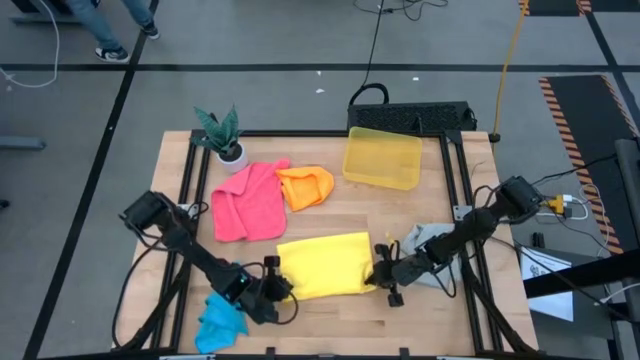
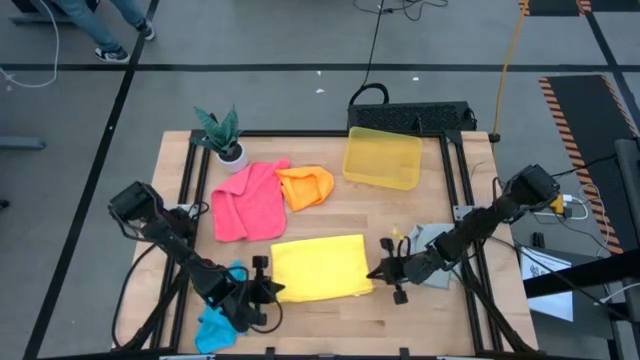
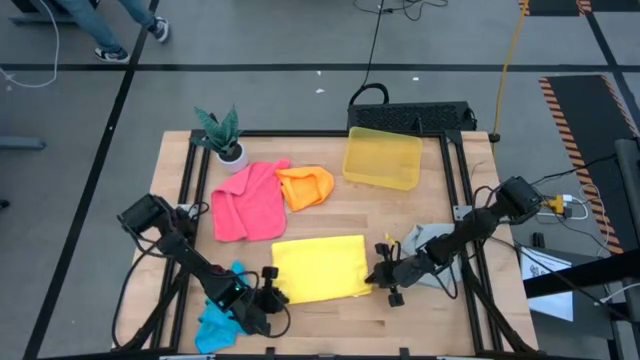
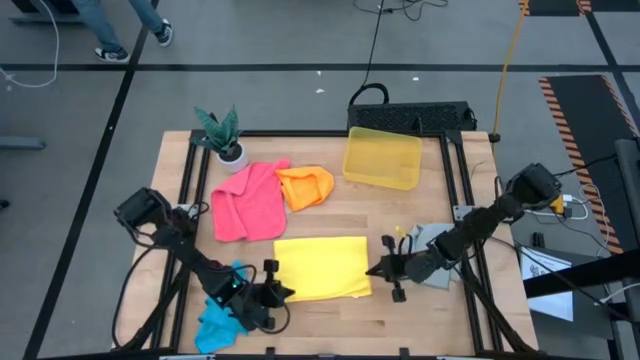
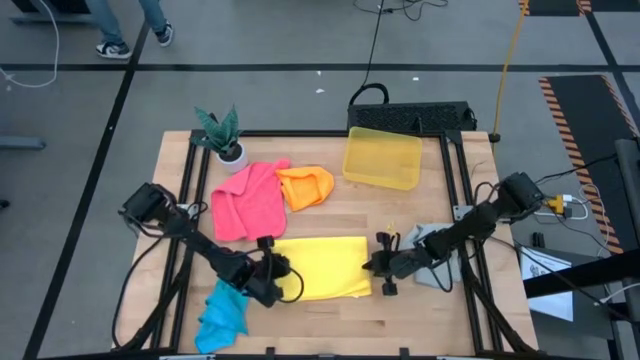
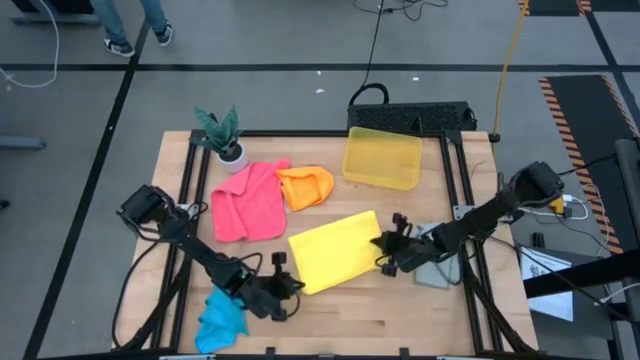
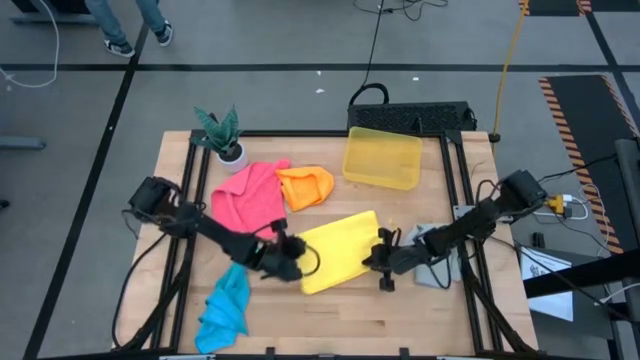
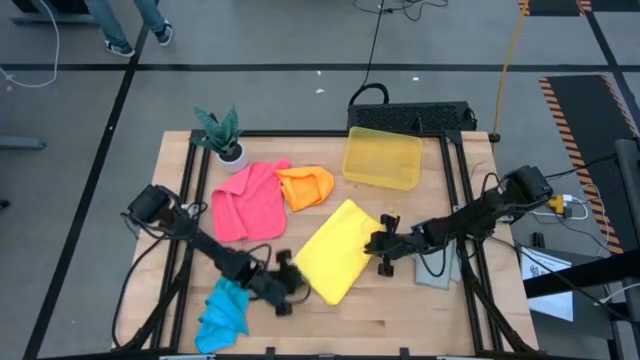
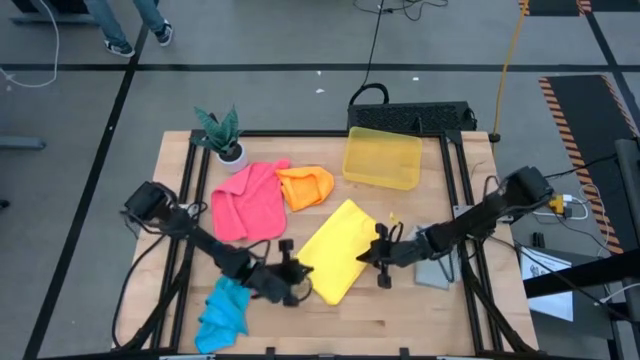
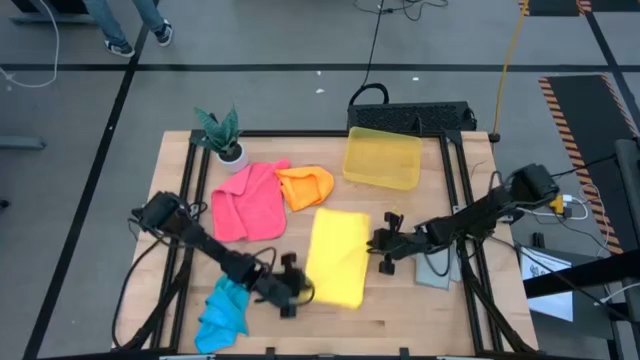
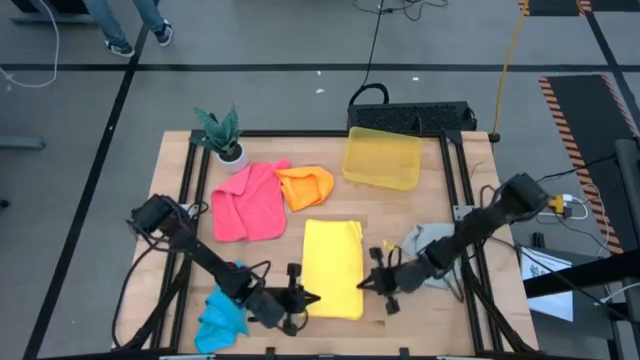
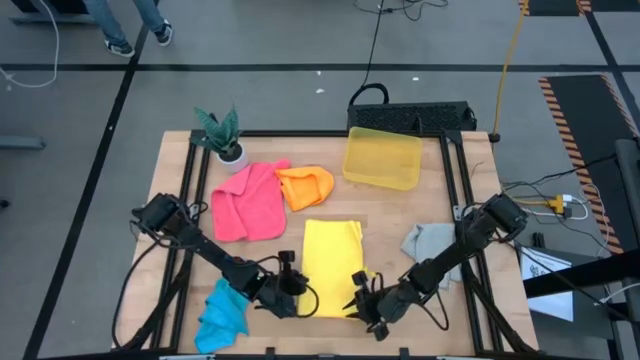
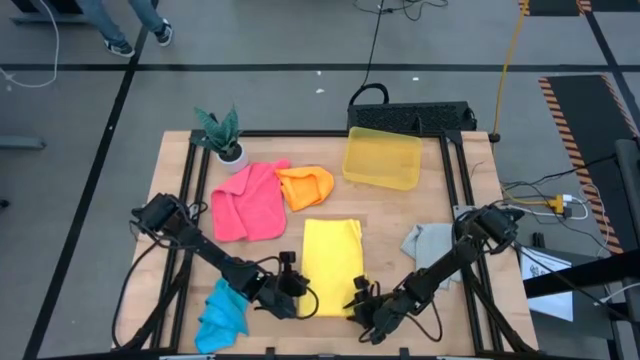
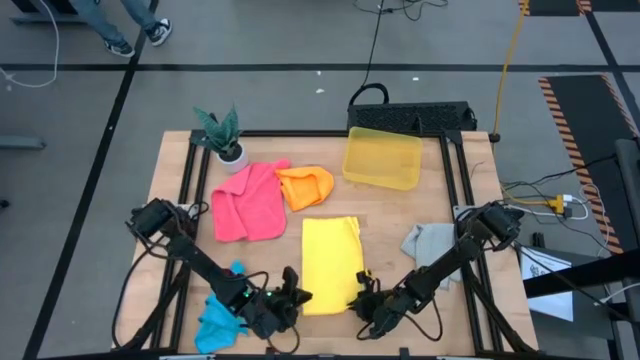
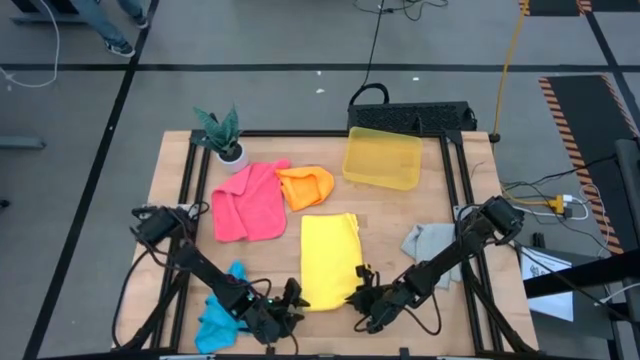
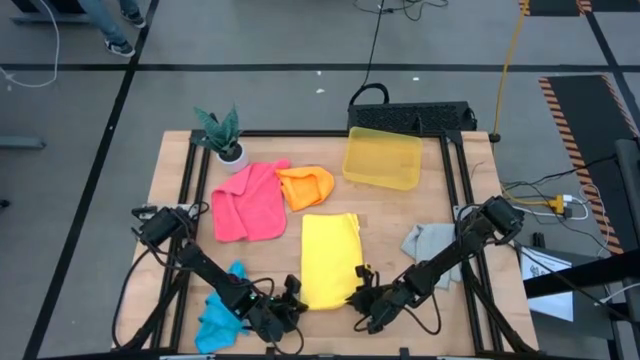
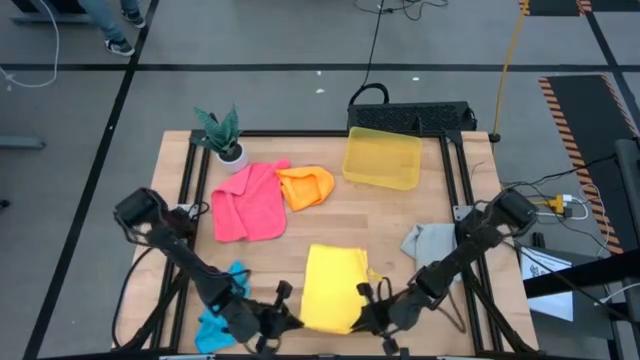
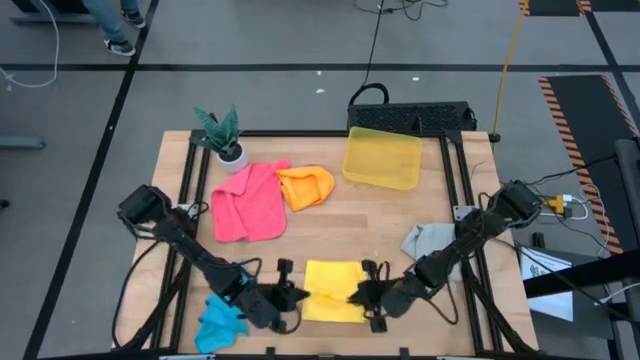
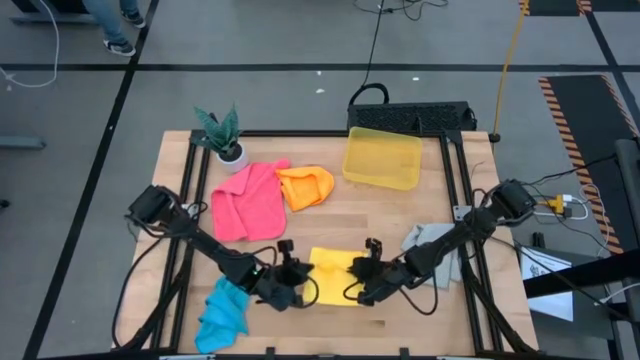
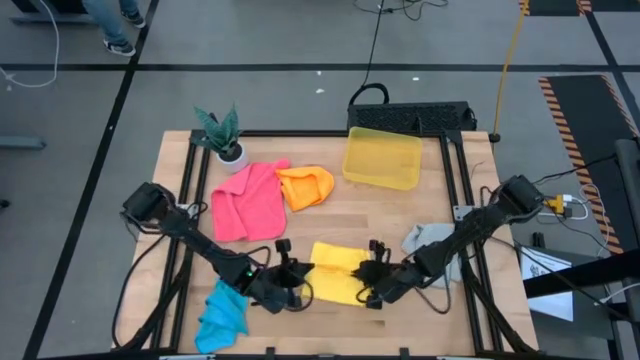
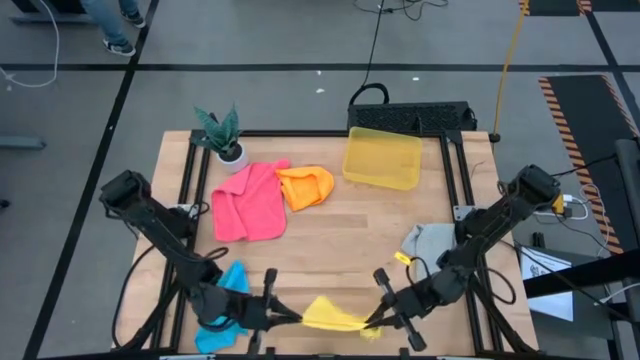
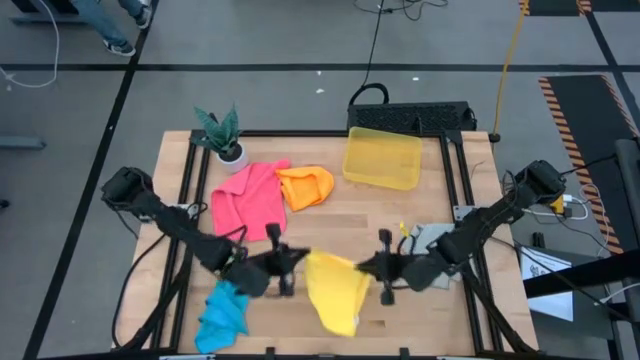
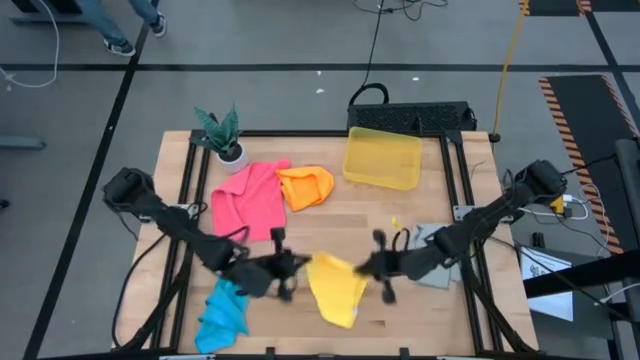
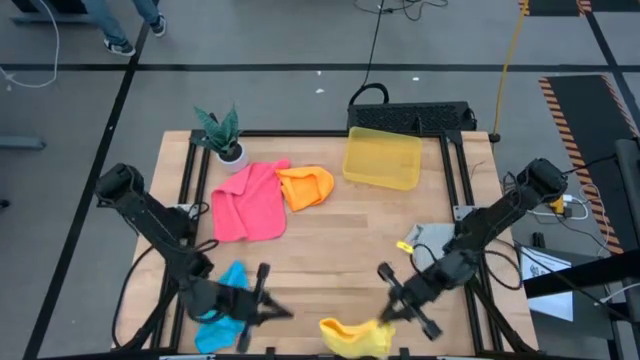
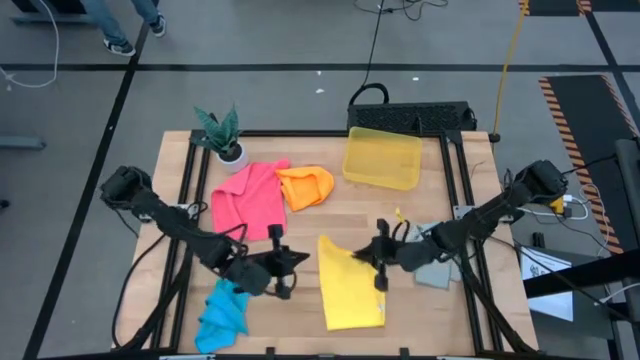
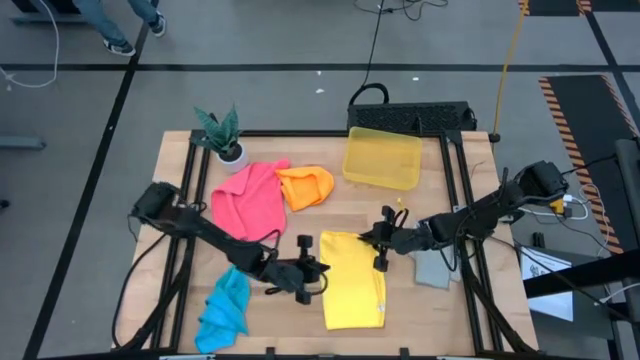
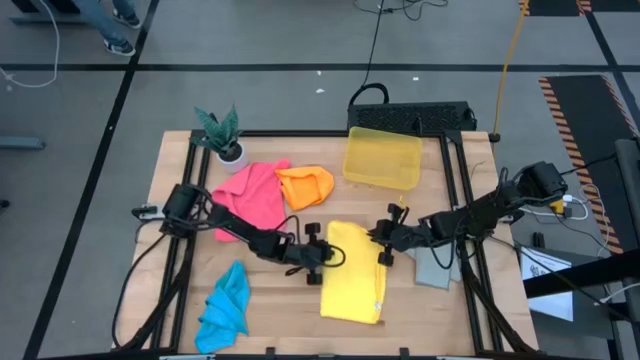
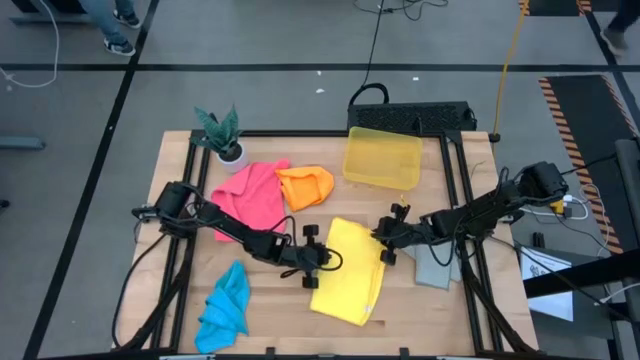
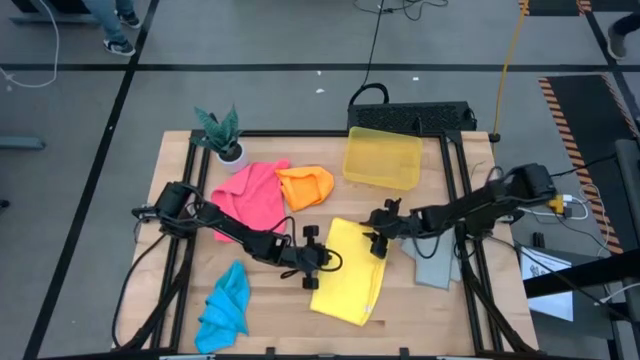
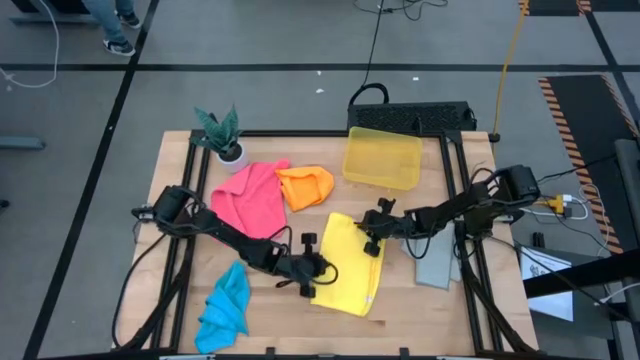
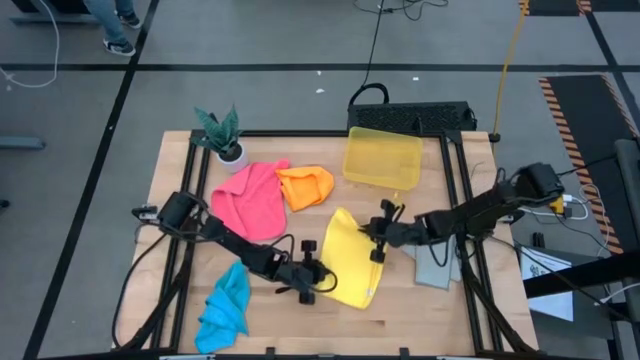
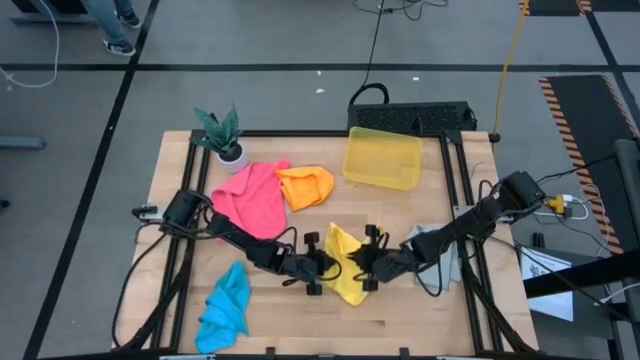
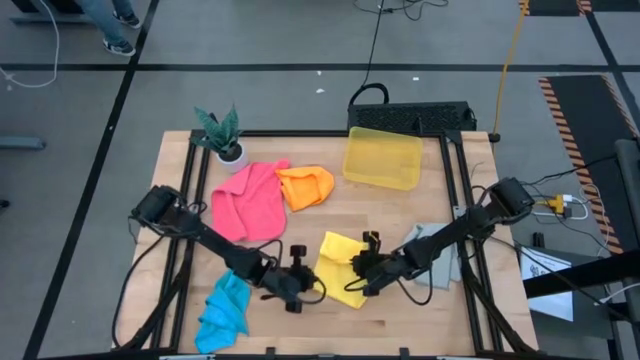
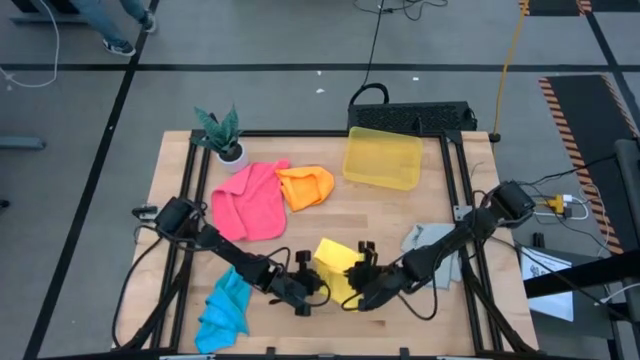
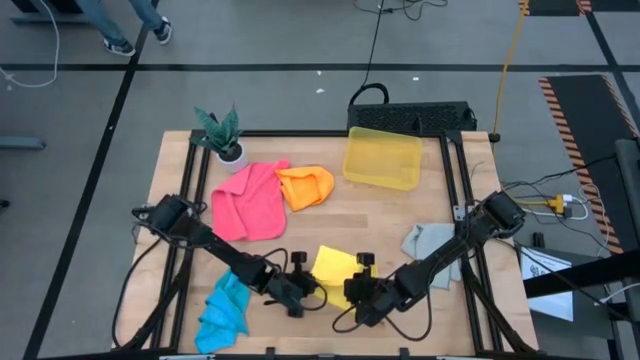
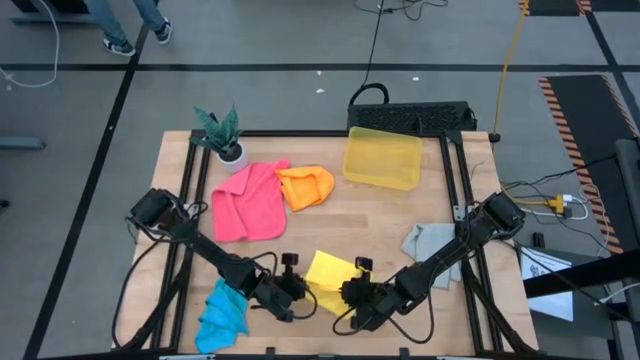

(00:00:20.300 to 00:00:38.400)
Task: Fold microfiber towels
Fold the yellow kitchen towel
